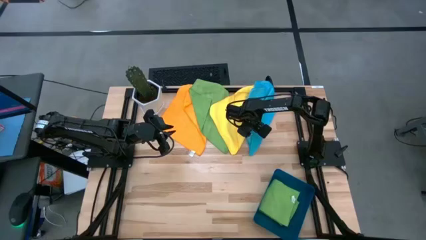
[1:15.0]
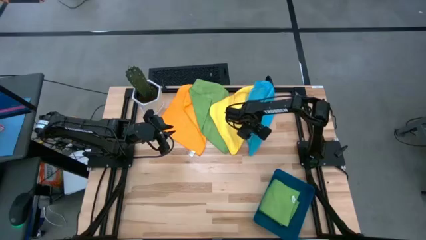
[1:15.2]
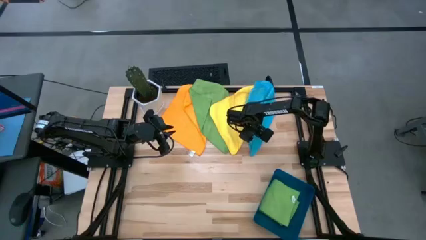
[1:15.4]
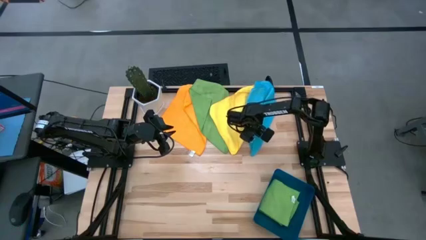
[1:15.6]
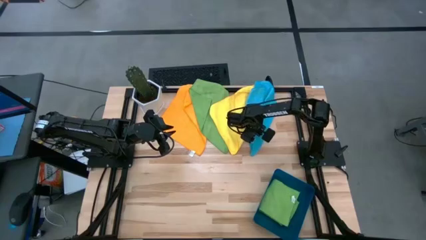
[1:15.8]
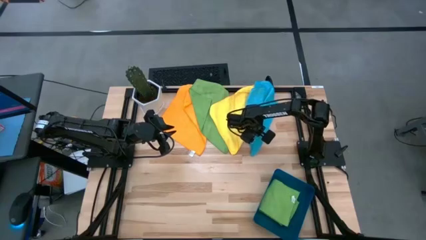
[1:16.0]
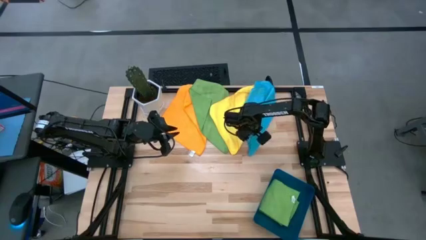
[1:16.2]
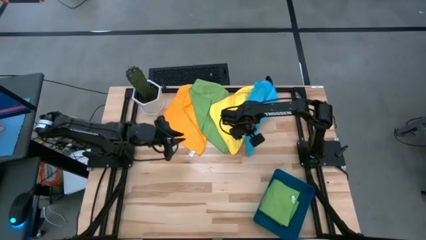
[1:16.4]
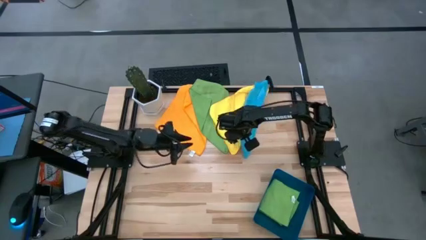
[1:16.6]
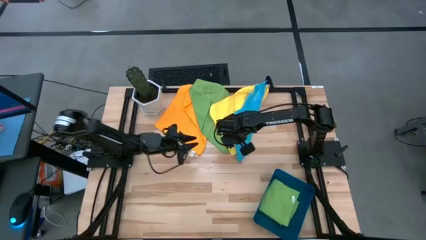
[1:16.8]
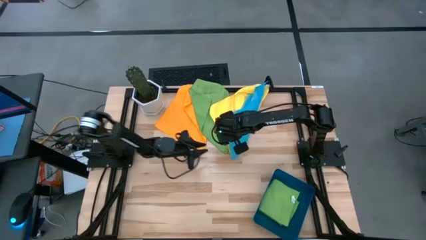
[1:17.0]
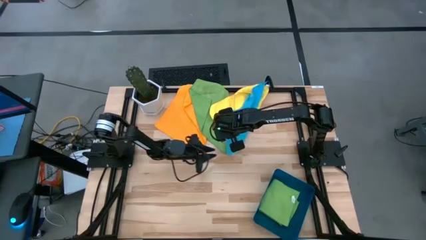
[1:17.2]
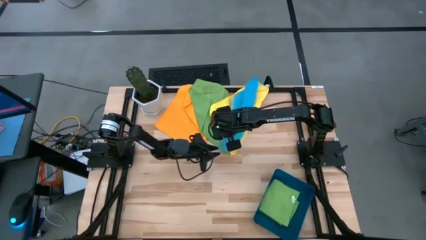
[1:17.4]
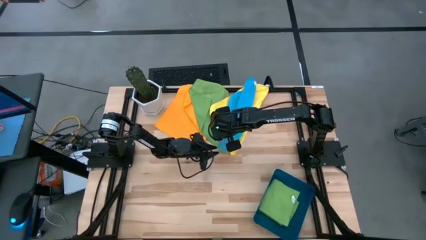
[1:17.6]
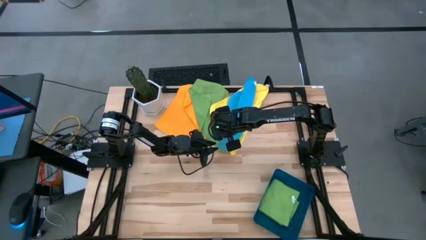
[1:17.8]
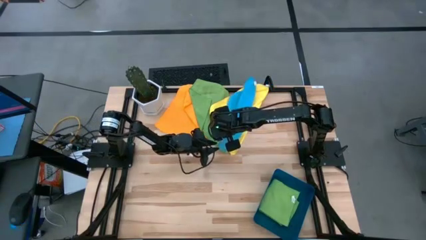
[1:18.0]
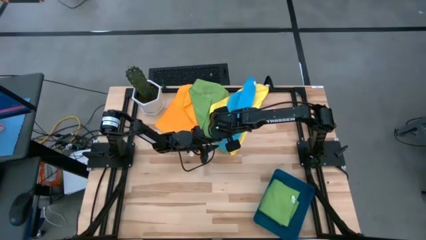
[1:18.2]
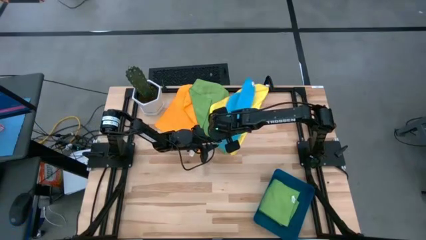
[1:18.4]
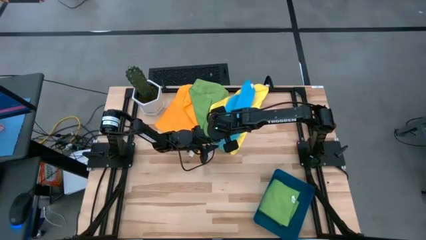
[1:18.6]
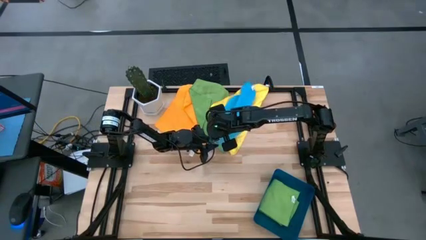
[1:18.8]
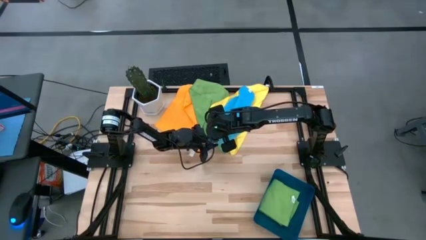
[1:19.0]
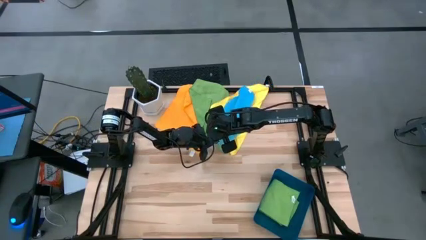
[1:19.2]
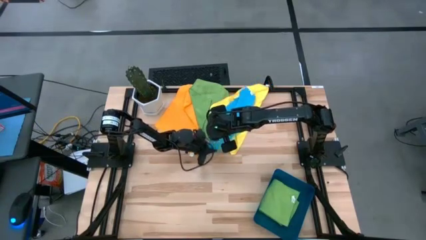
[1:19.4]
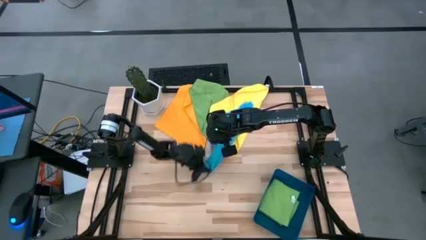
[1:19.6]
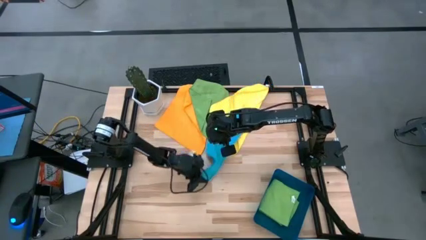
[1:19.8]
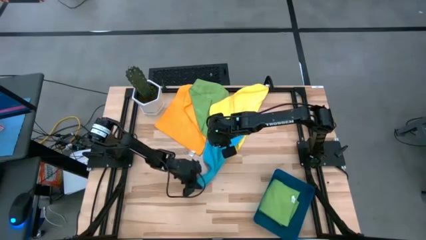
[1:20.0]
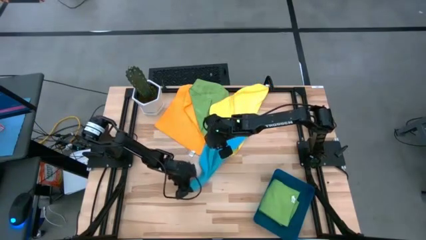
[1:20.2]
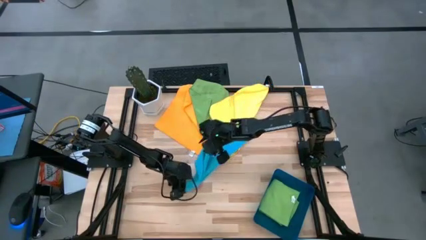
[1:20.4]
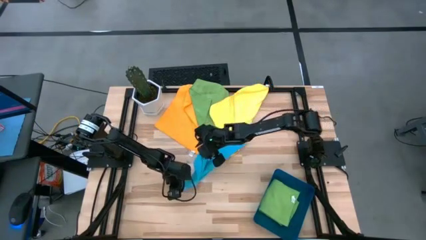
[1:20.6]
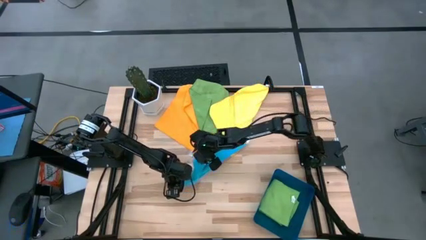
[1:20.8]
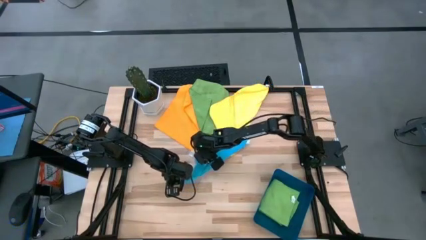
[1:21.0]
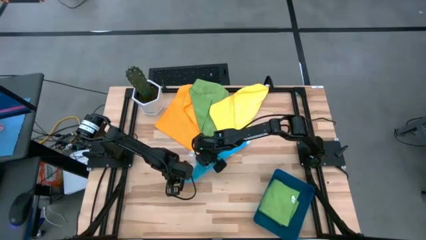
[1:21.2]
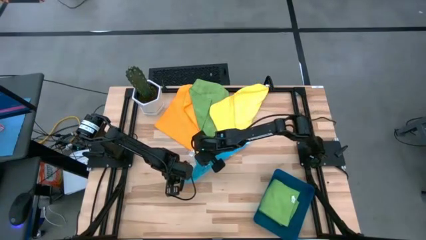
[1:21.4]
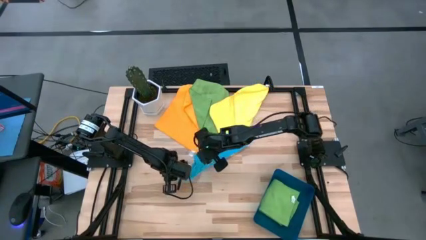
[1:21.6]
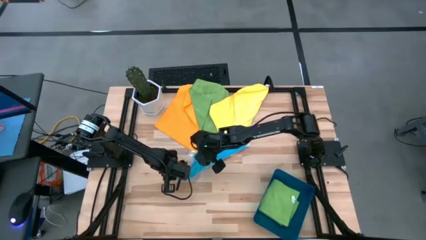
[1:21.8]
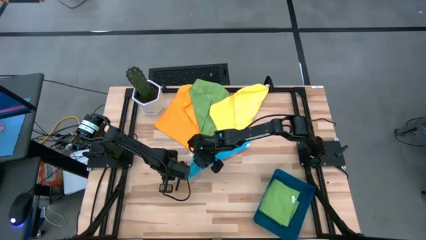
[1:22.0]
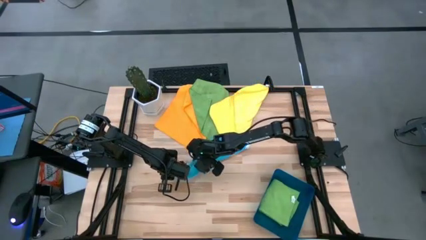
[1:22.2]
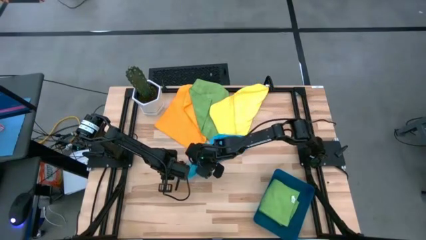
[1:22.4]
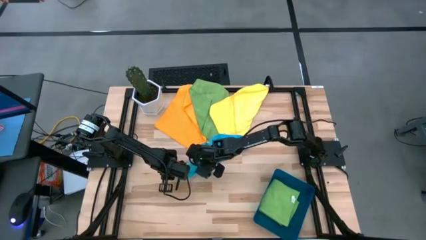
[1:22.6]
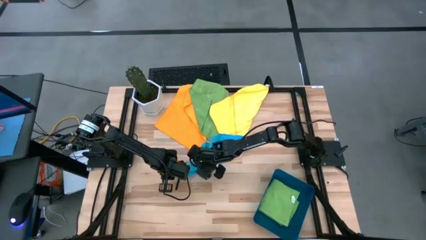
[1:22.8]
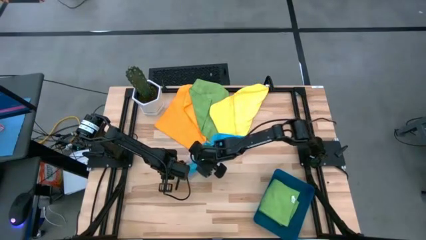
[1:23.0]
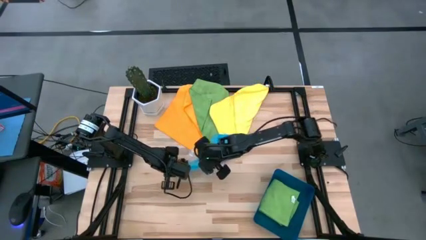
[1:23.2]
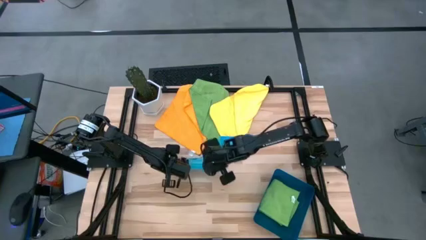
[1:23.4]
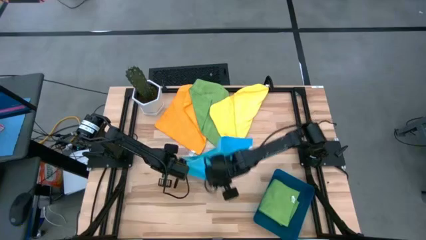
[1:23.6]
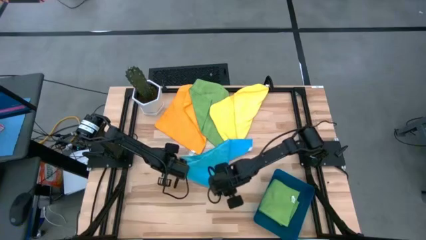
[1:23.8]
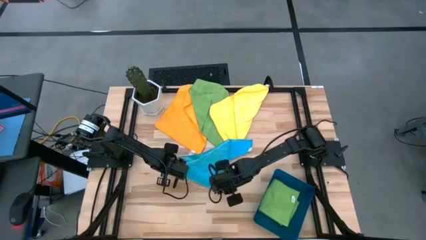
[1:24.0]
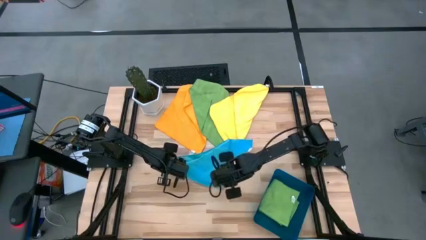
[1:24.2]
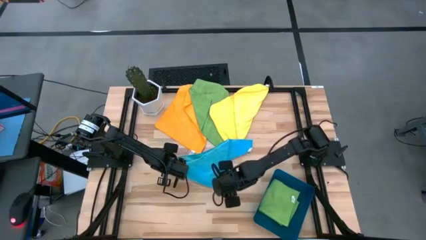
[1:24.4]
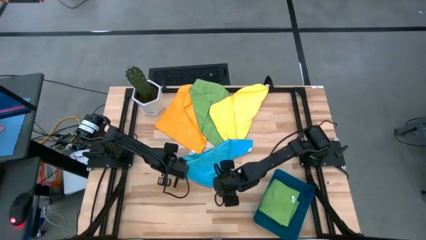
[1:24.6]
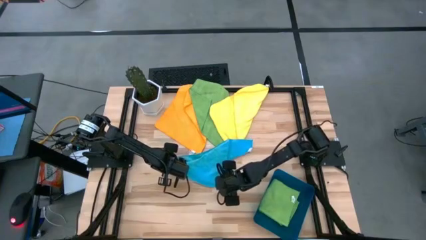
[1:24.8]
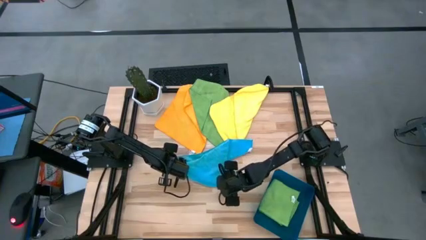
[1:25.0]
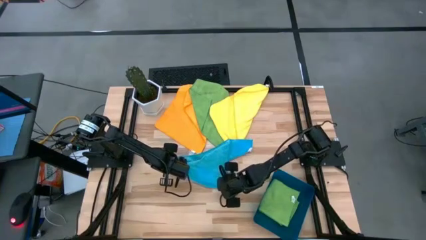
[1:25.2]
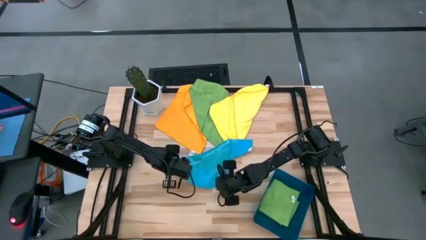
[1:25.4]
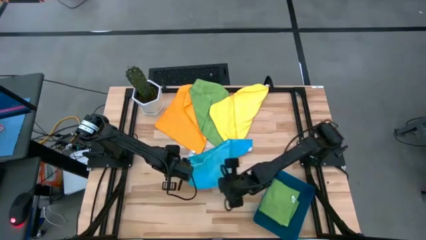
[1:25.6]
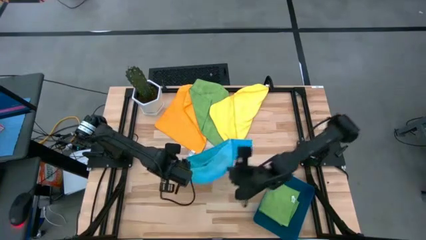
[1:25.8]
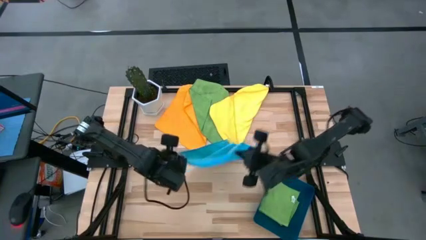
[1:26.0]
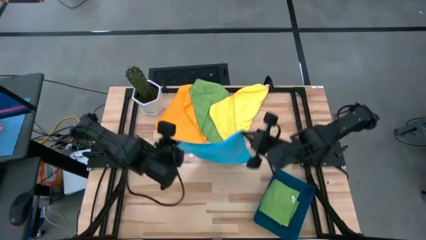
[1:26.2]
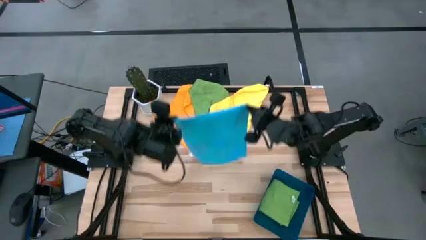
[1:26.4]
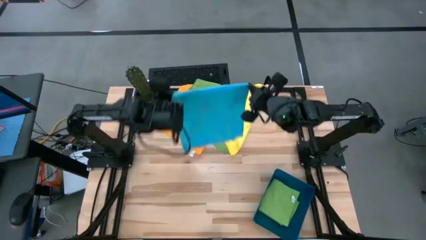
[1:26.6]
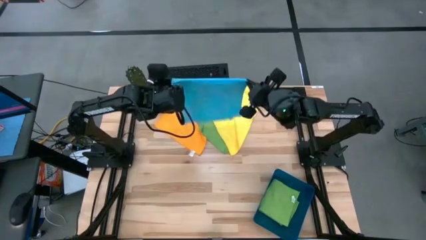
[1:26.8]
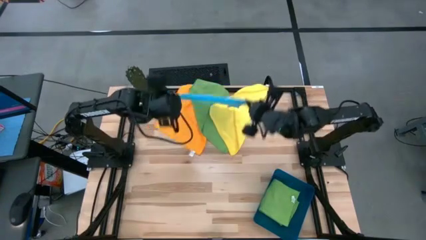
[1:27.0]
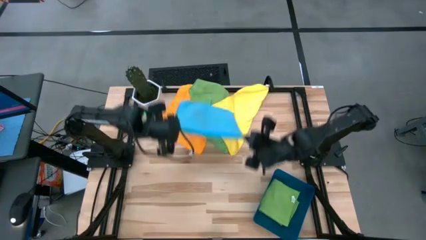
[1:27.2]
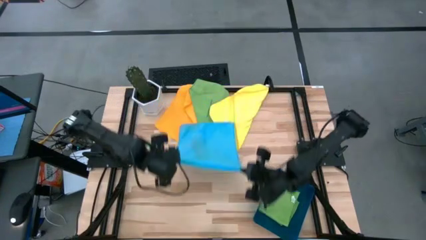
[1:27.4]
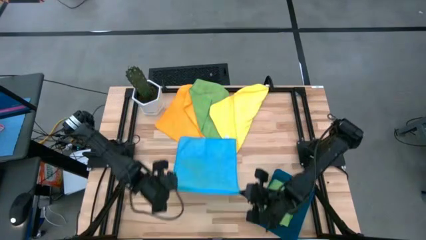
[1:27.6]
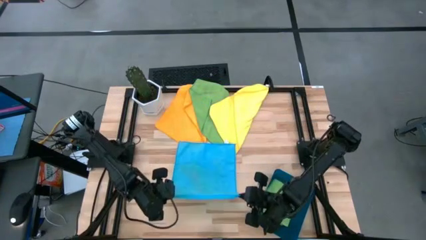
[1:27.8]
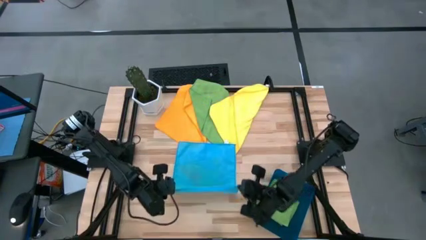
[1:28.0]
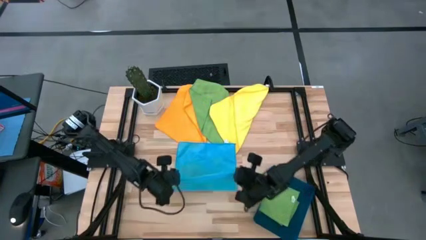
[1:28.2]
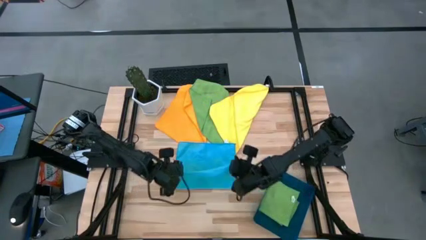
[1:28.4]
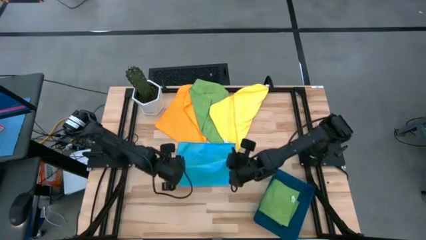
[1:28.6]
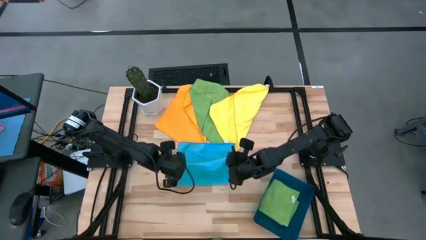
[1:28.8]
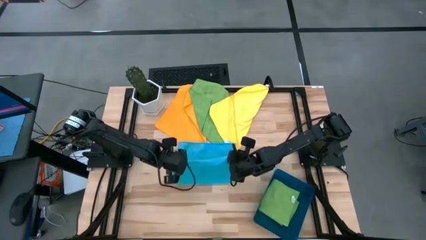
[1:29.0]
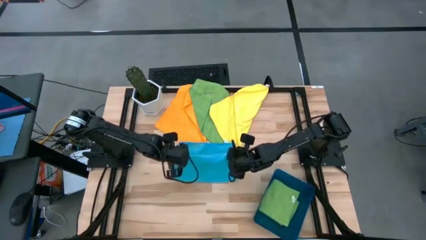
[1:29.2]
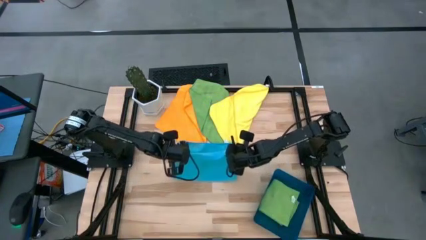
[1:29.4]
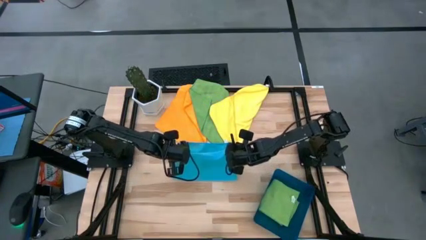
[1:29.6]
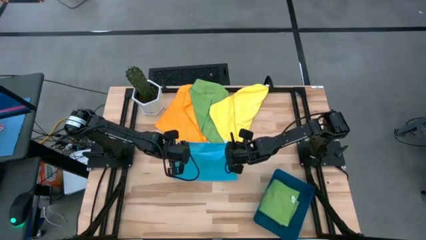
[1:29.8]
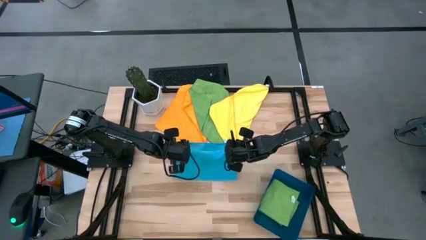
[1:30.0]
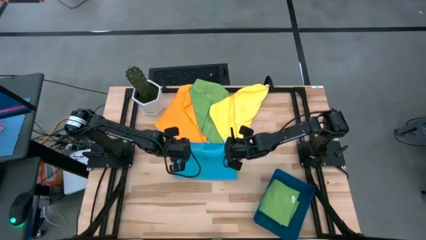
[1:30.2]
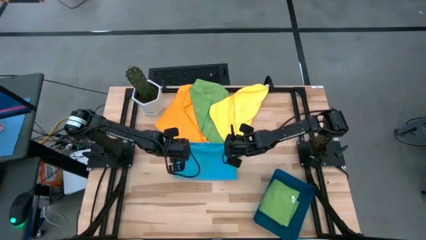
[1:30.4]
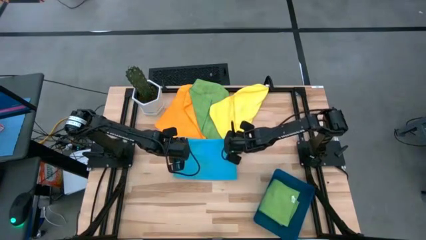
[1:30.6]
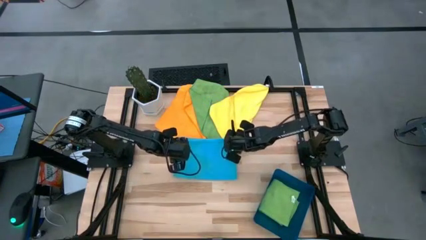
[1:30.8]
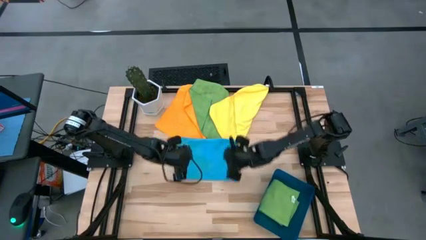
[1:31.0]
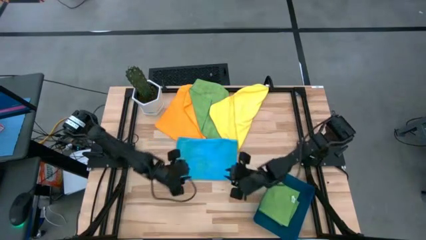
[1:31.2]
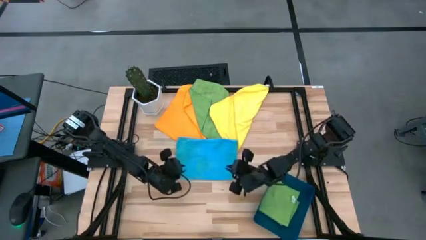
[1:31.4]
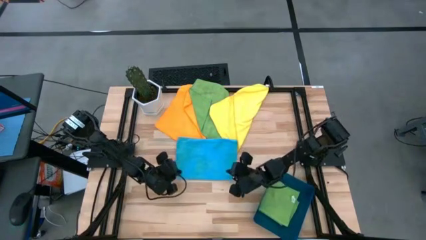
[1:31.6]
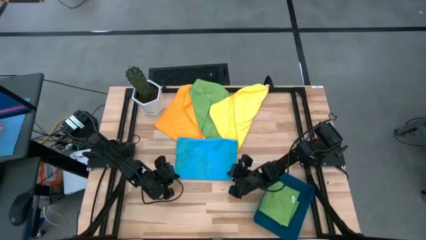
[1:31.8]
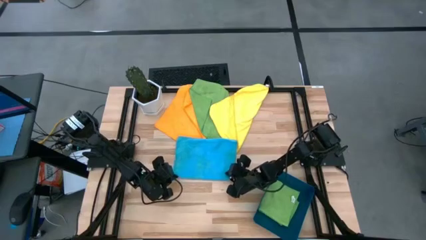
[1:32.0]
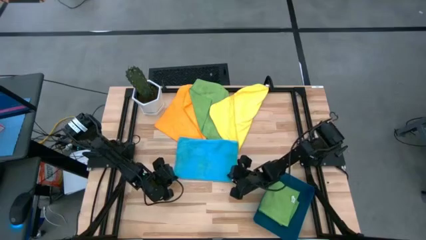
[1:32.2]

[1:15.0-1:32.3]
Task: Fold microfiber towels
Fold the blue microfiber towel

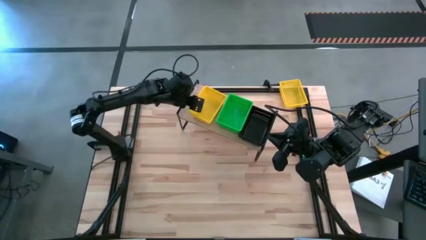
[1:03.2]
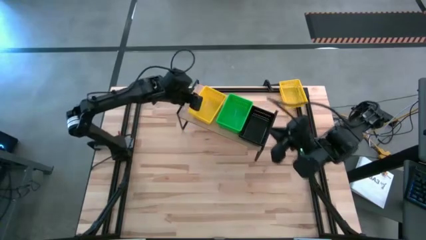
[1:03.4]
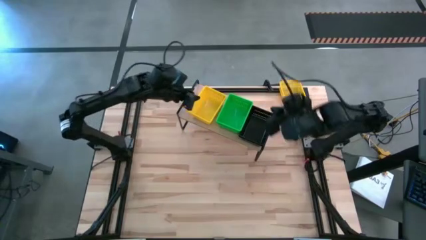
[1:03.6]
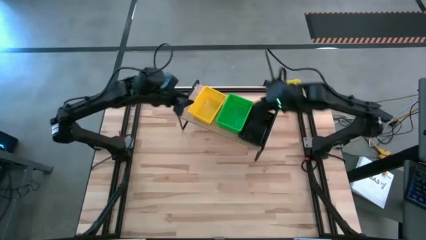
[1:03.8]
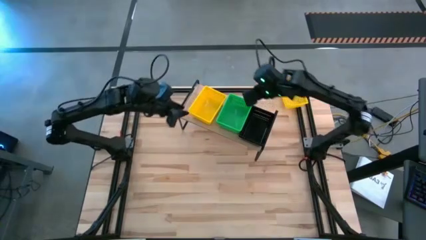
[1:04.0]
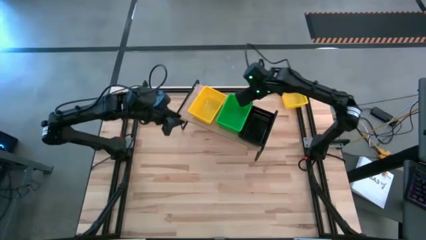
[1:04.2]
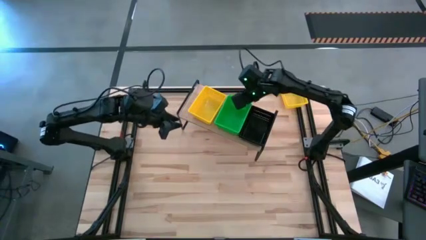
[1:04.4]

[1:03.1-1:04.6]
Task: Stack baskets on shelf by color
Adjust the stacked green bins on the shelf
